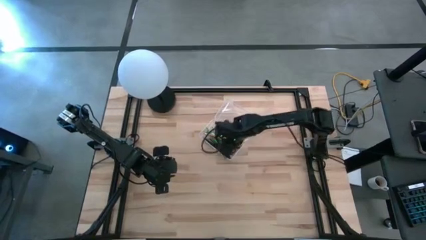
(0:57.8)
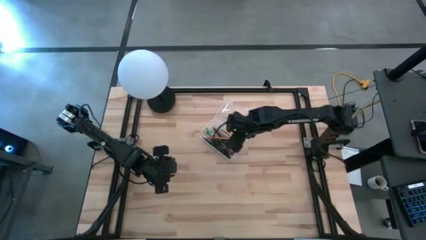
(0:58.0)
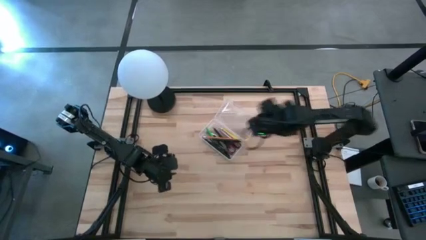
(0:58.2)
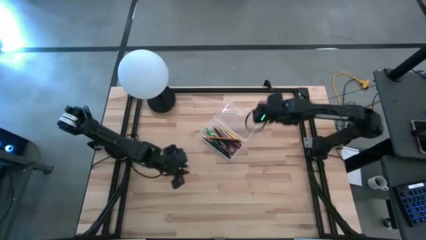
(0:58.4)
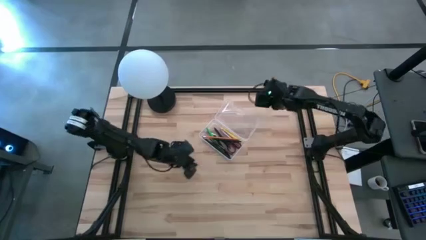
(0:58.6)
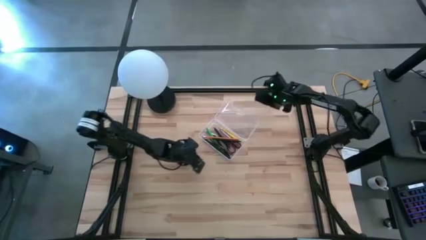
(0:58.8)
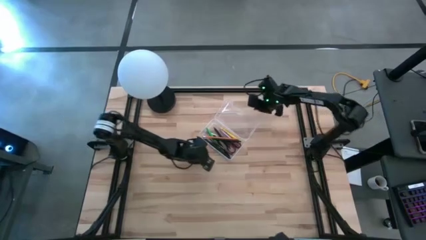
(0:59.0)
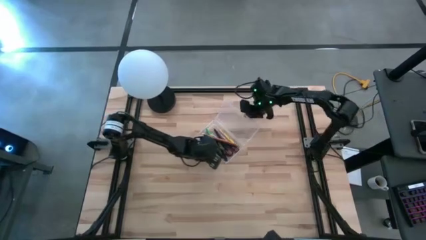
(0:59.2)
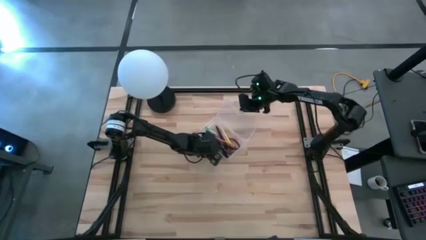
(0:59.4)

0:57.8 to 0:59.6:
Task: Pick & place school supplies into a supply box
Close the transparent supply box on the table

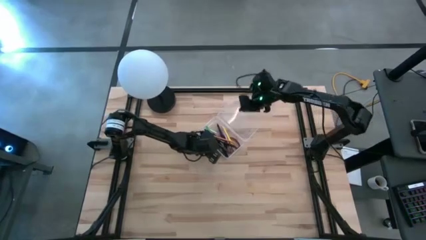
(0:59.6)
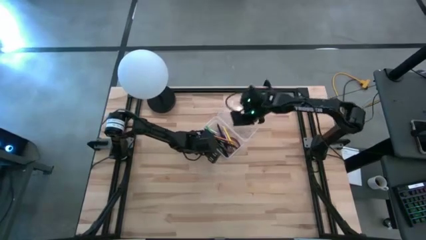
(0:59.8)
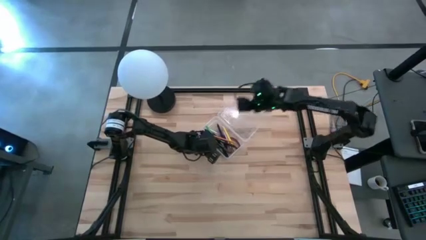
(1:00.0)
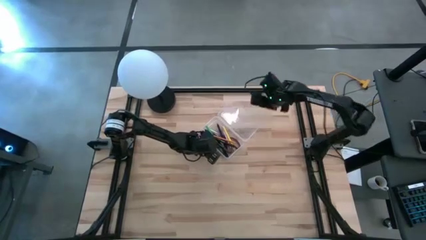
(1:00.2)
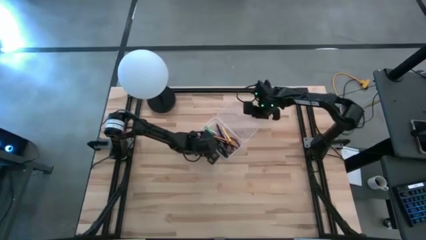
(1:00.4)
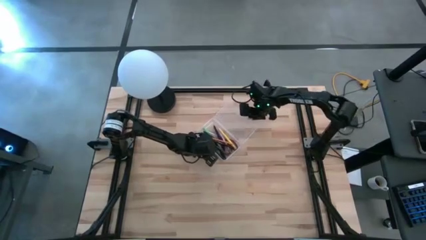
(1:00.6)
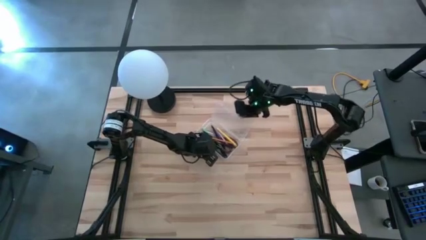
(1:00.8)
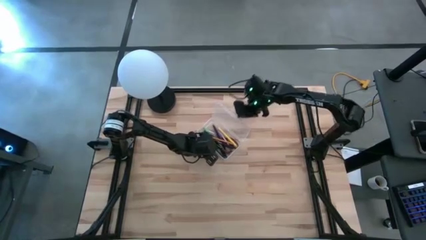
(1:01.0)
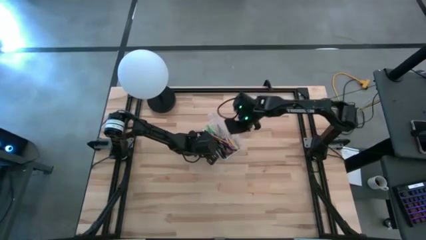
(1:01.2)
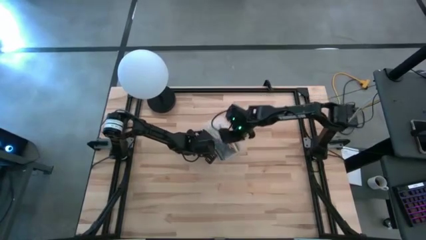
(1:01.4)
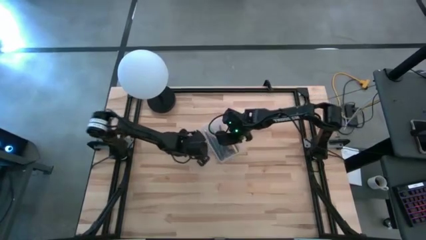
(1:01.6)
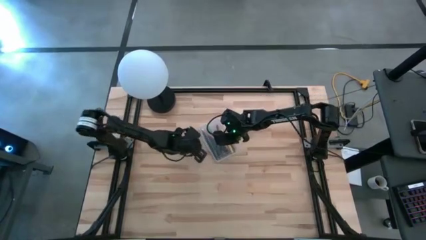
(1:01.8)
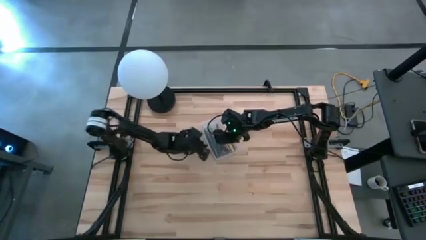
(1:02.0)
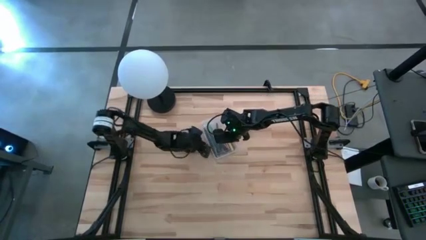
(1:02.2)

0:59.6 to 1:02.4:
Close the transparent supply box on the table

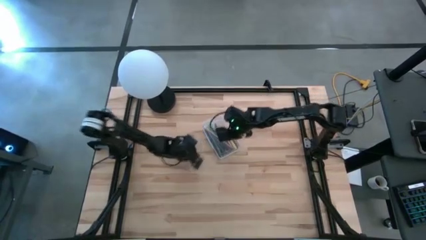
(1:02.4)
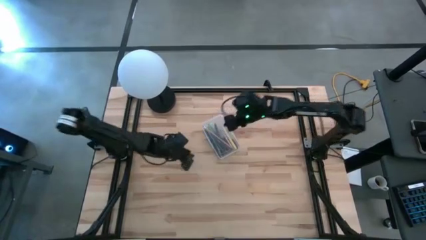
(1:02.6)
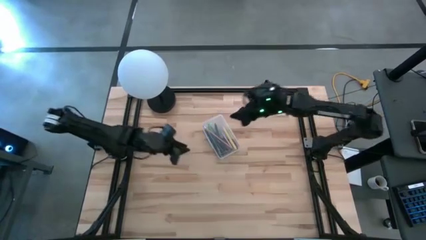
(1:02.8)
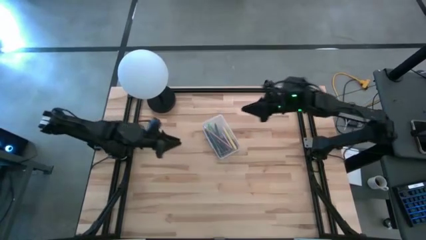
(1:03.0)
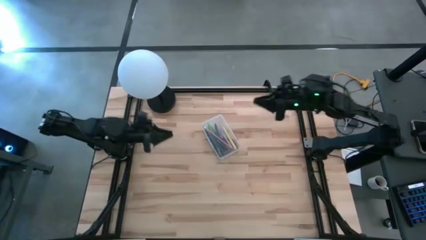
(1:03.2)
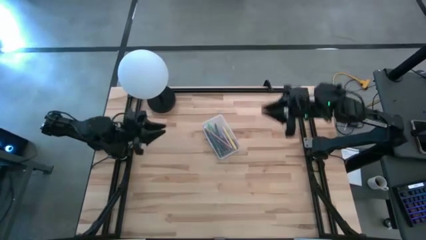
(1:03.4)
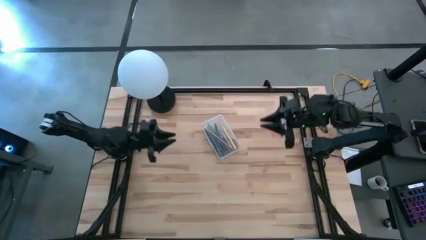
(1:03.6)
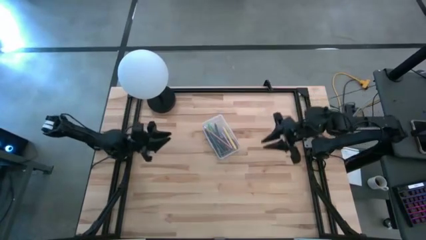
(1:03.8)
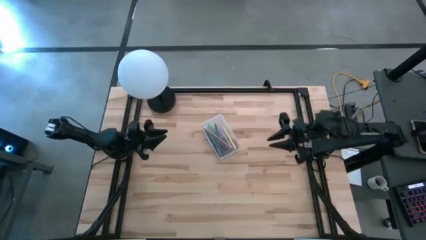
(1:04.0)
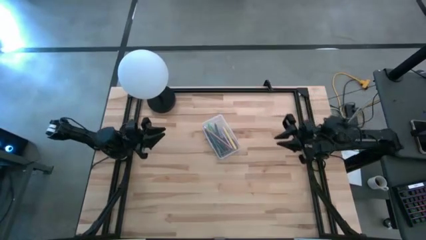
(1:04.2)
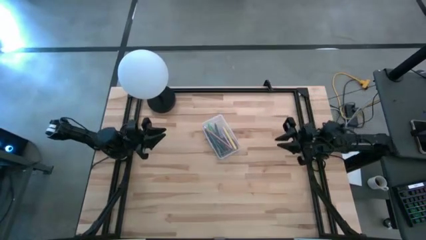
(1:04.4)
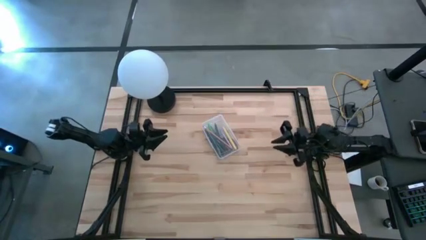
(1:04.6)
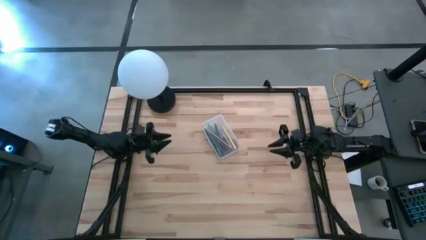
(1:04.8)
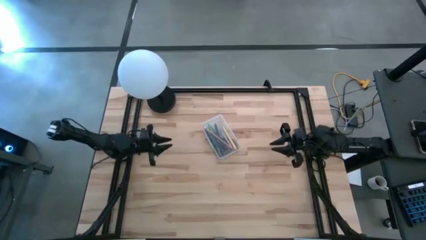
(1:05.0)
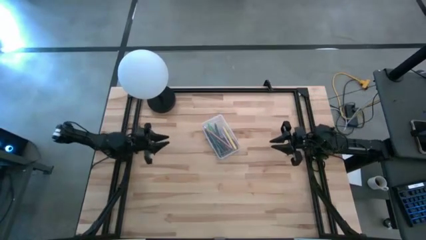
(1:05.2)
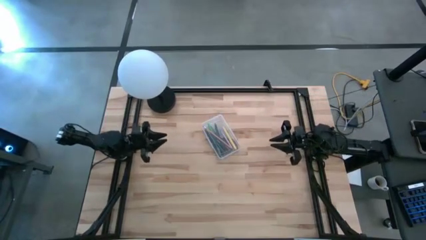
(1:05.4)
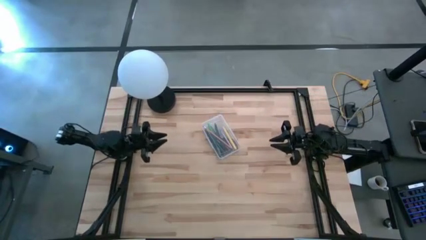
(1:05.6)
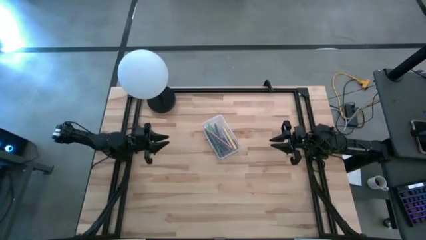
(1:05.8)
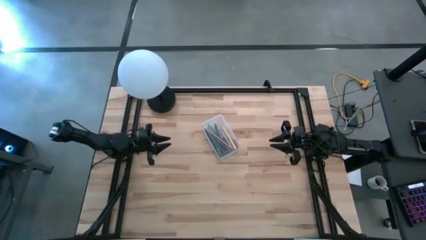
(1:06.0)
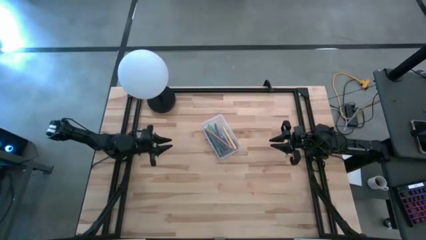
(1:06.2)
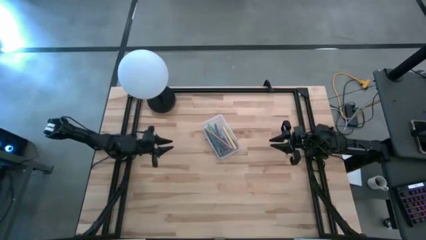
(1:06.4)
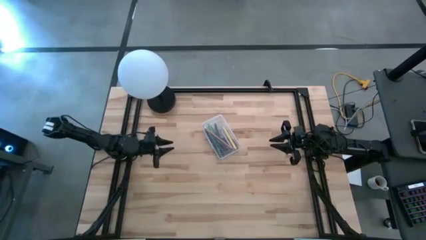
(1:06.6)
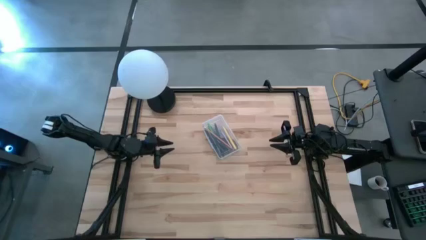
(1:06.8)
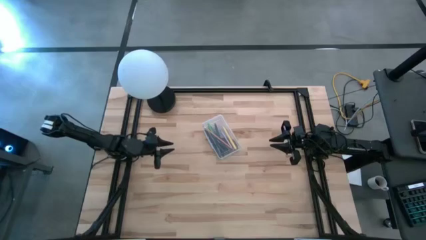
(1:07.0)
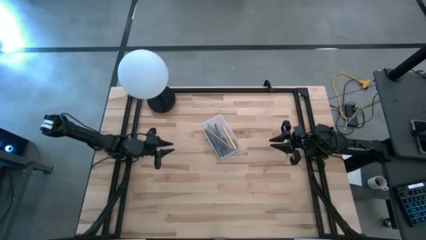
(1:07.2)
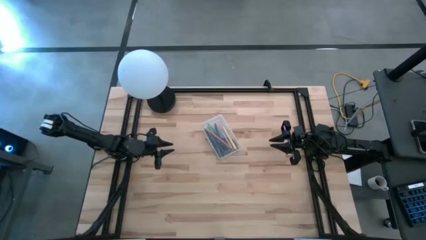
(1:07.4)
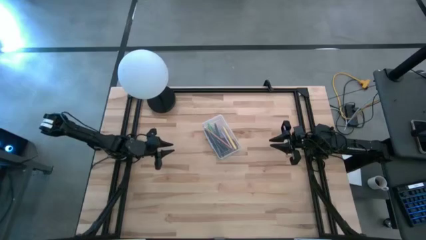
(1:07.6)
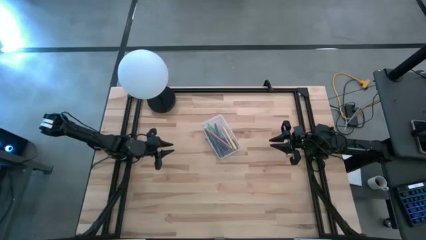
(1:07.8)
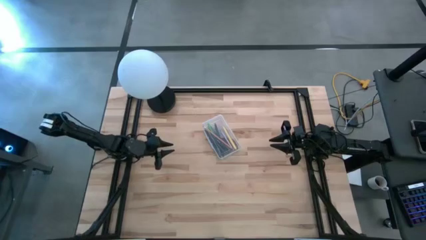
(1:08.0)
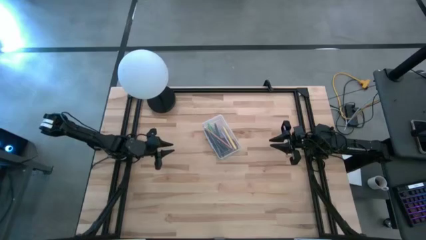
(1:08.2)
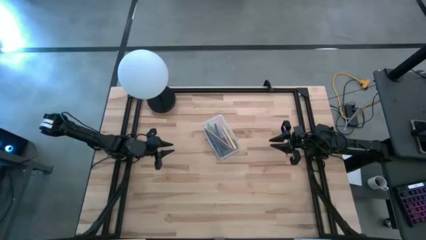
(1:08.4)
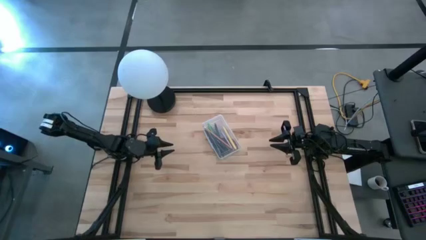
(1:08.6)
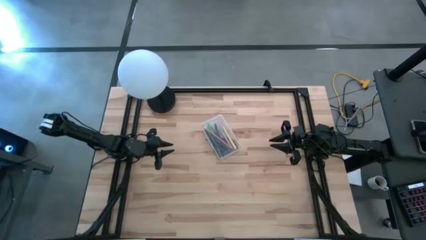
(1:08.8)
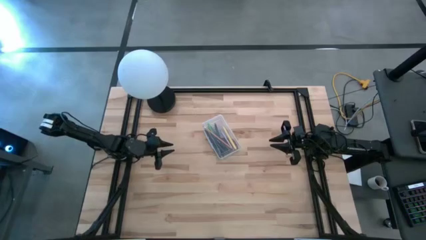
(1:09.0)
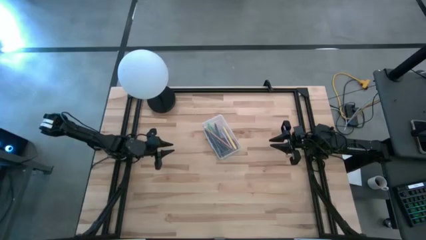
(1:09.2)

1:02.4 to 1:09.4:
Return to Home Position

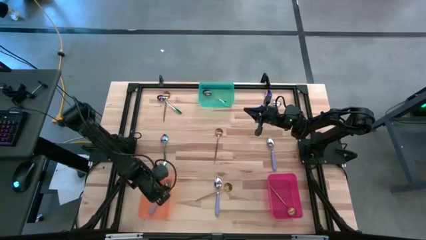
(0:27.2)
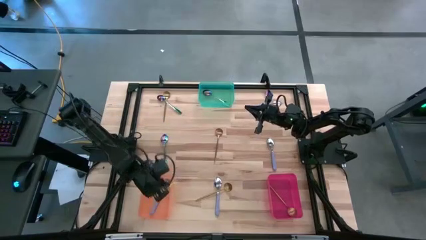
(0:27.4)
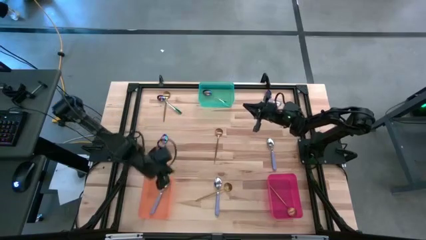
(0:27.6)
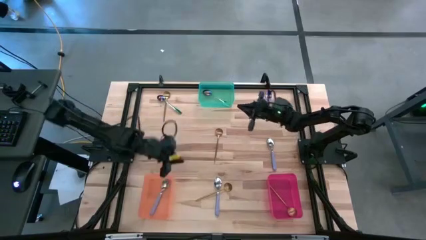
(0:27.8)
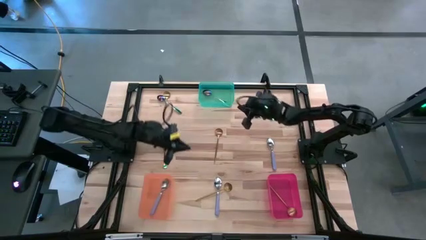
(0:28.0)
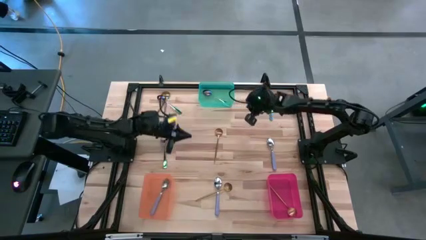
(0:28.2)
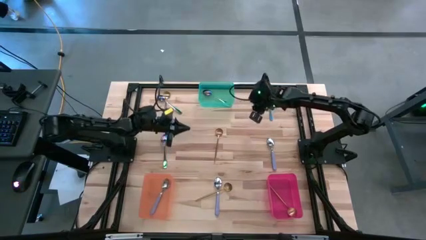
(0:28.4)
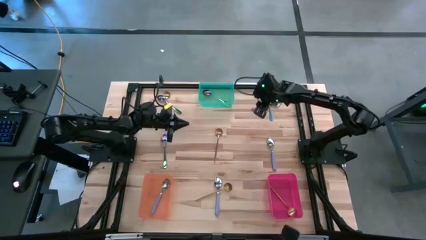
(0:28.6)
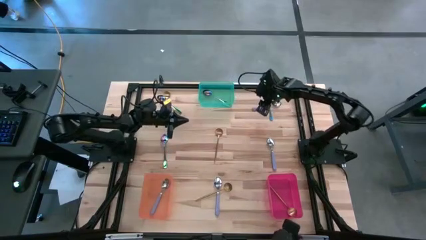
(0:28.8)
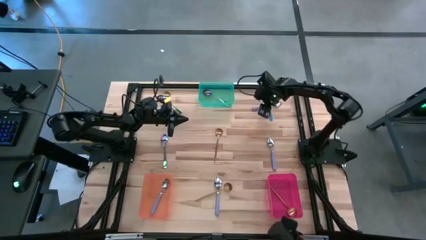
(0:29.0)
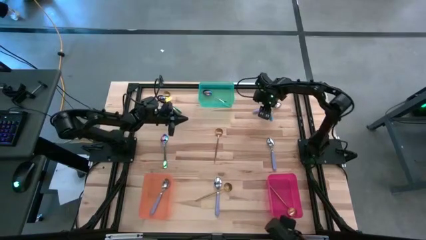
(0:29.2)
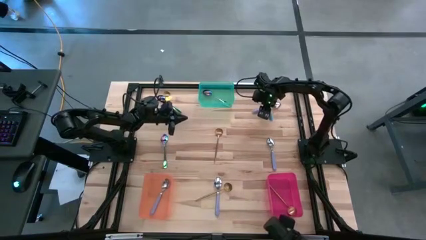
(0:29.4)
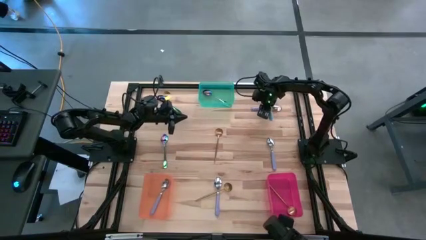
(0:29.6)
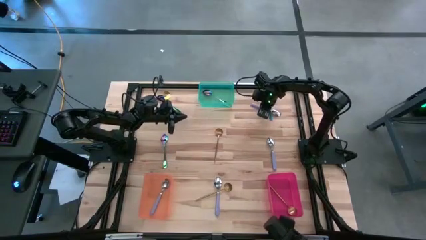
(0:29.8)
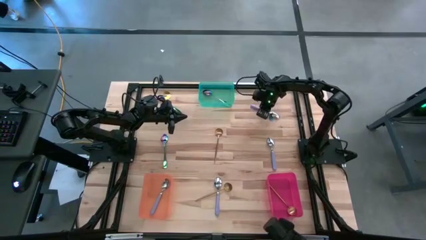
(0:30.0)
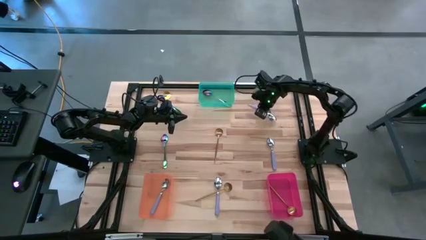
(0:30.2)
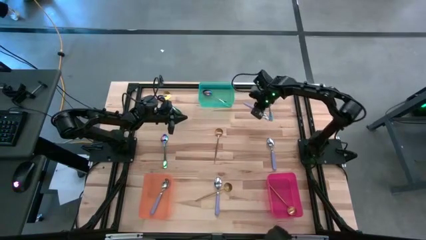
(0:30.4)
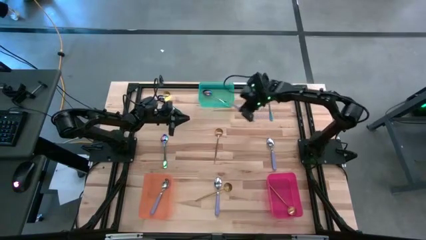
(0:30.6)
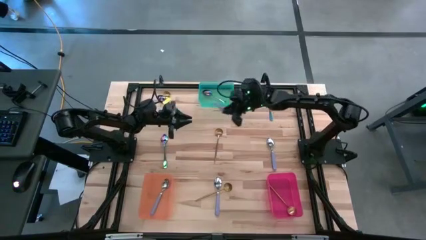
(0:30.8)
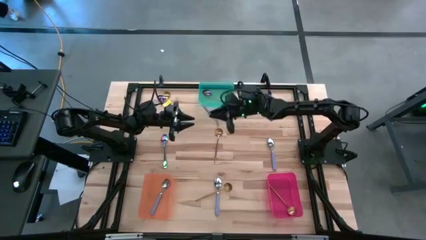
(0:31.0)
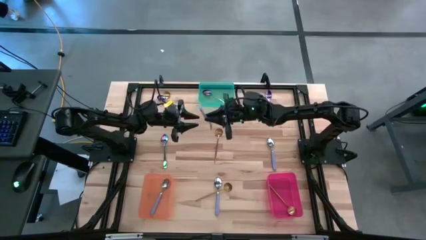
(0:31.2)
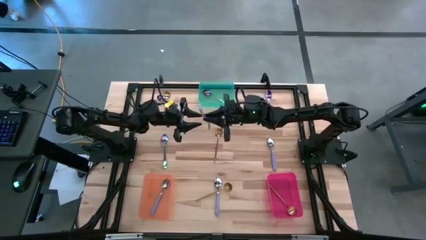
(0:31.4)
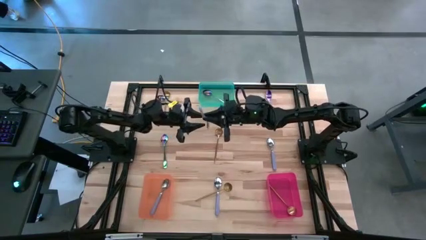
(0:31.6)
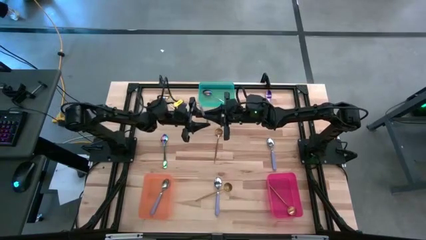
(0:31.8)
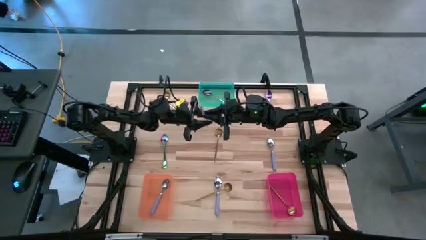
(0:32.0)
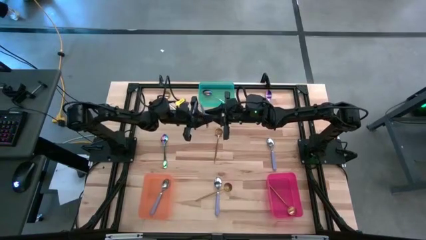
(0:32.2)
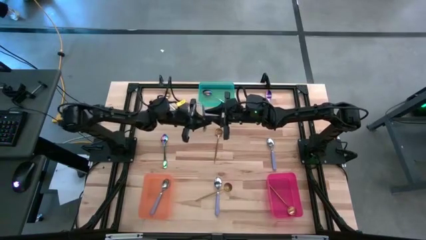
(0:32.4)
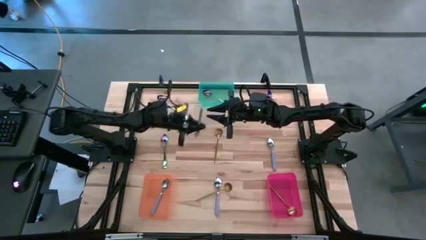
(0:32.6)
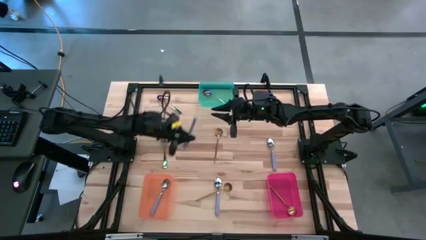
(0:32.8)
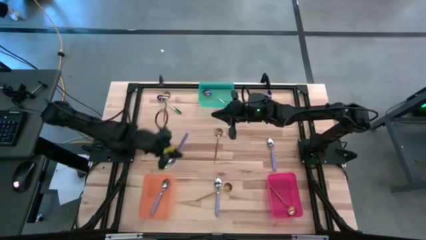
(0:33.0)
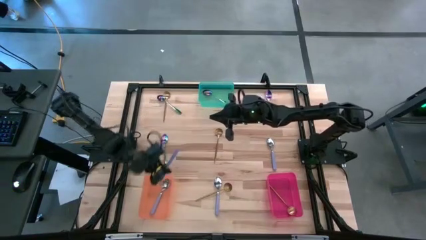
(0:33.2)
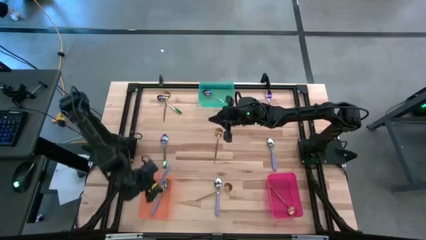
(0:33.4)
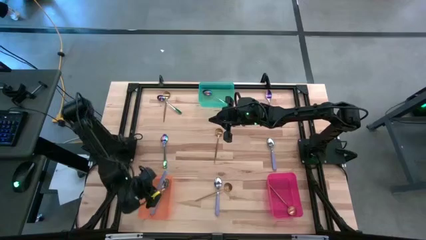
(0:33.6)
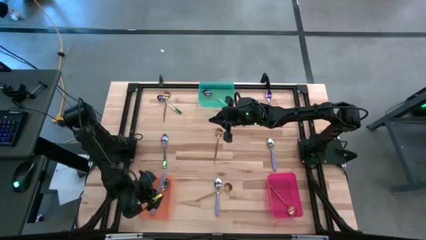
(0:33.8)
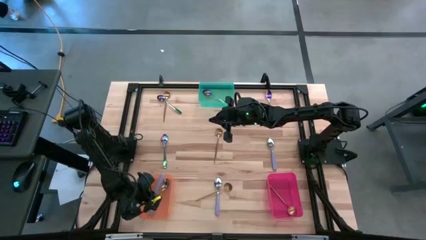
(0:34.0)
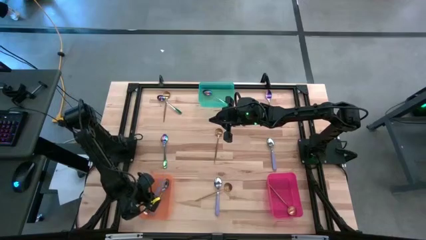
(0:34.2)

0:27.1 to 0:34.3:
Task: Sort silverware by color (type)
Put the purple spoon into the orange bin
